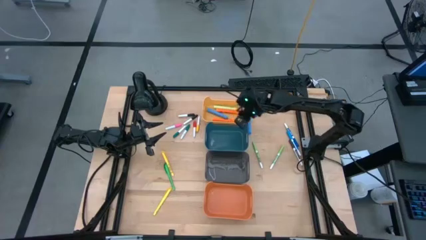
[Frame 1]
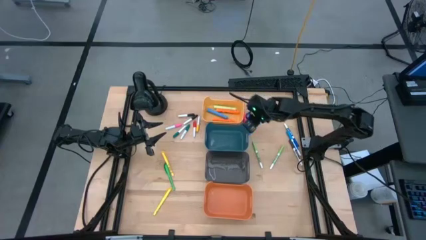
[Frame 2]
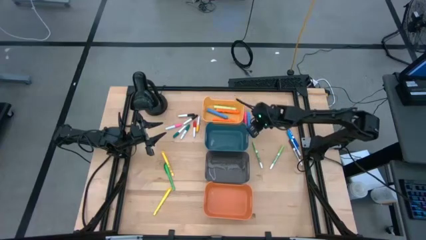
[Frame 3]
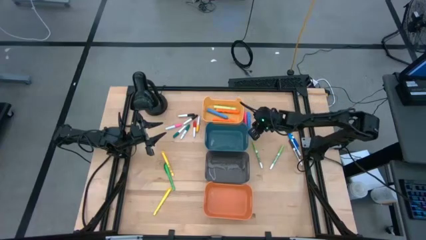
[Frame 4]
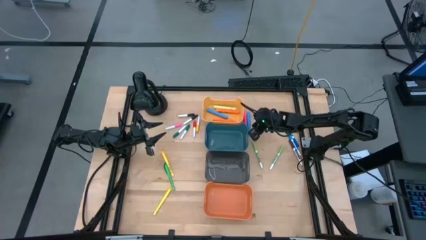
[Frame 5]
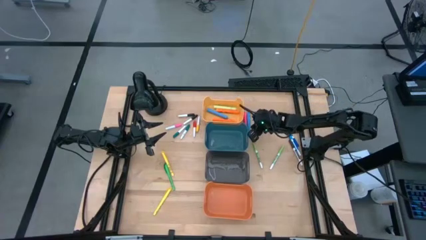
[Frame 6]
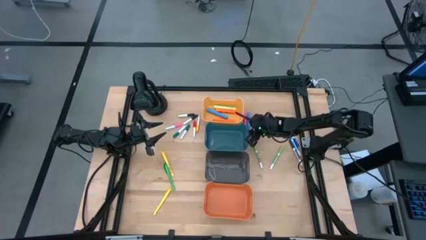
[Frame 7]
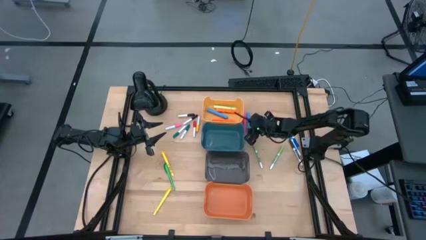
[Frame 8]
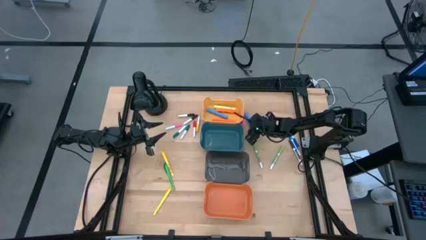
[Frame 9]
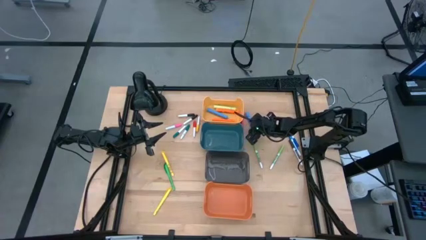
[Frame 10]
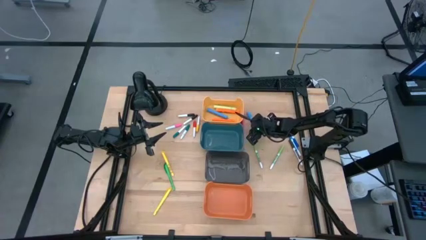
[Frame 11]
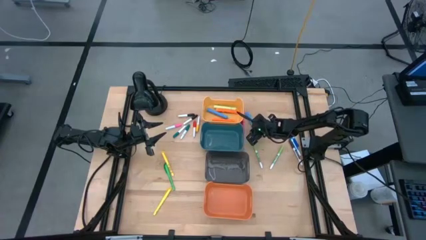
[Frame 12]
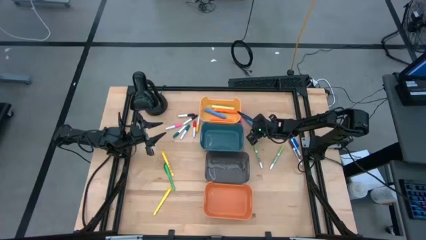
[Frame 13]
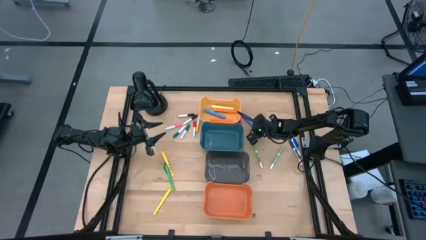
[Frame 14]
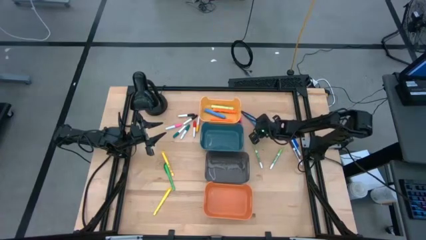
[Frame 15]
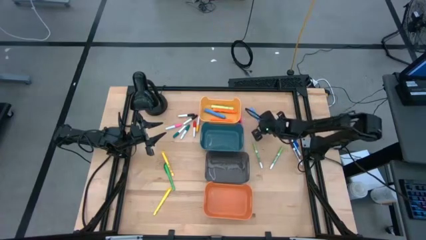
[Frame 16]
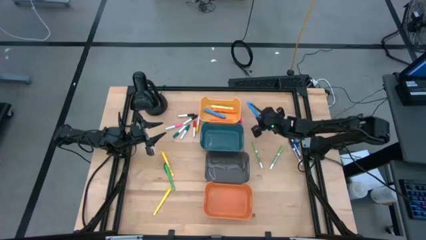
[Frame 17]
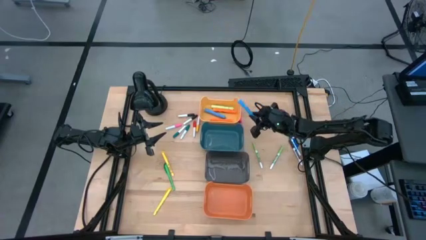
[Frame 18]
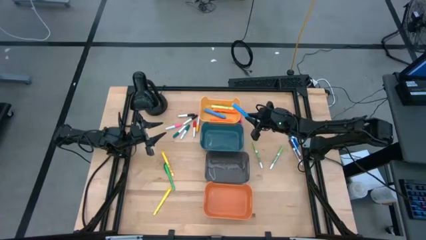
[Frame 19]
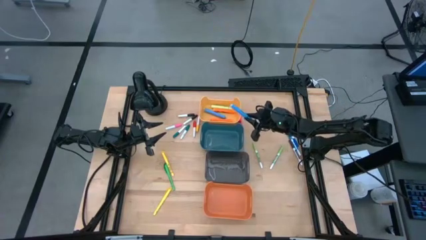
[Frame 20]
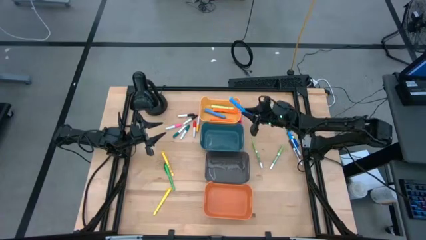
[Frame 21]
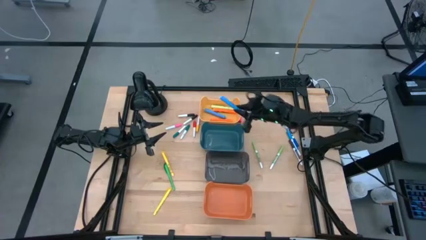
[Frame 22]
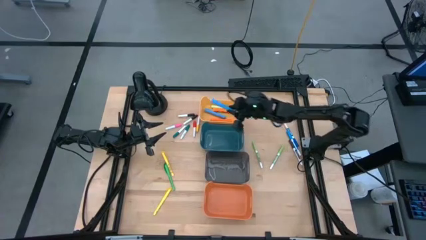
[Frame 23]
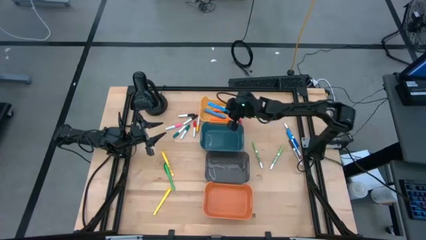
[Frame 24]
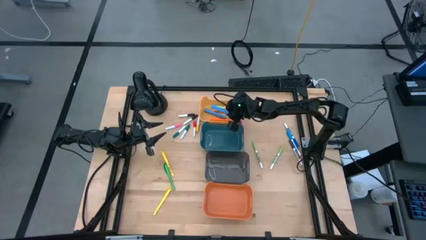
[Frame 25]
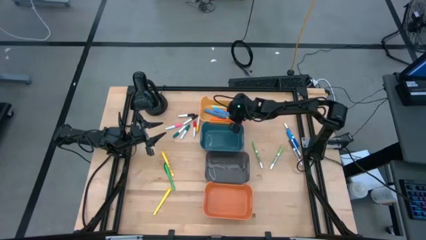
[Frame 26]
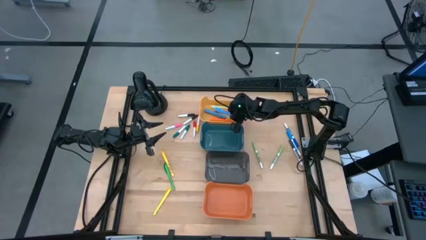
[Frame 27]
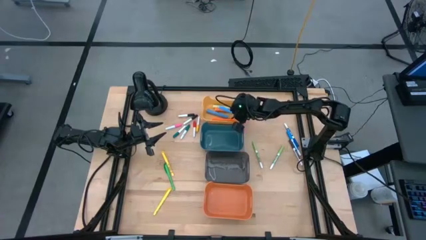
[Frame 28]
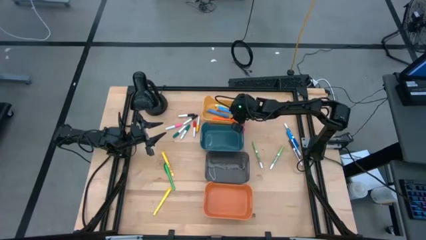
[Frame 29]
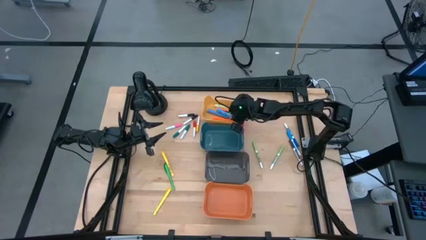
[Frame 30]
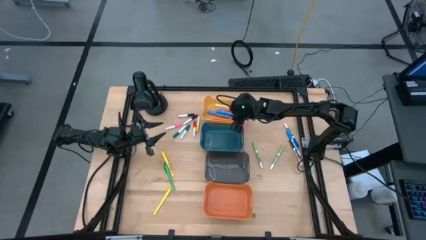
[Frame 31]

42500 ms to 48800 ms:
Task: Pick & Place Markers
Put the blue highlighter into the yellow bin

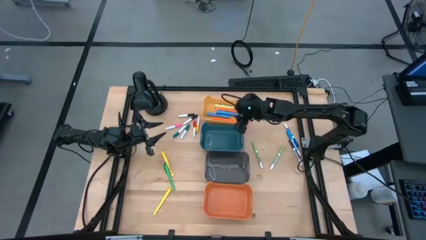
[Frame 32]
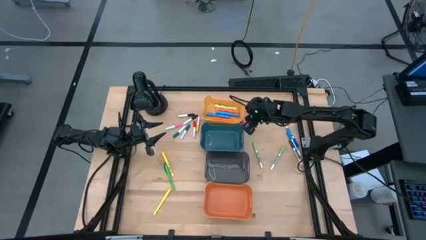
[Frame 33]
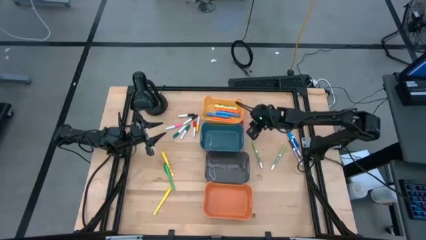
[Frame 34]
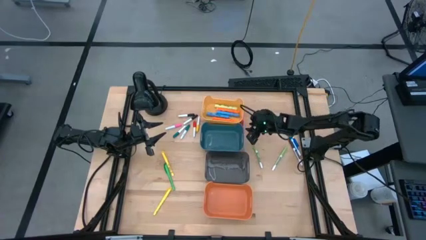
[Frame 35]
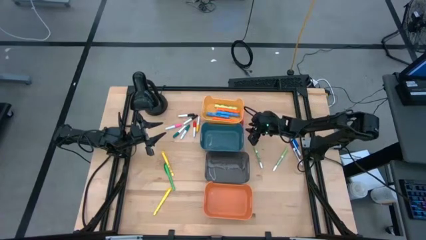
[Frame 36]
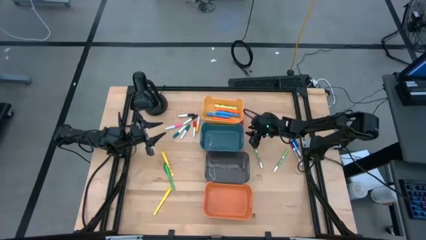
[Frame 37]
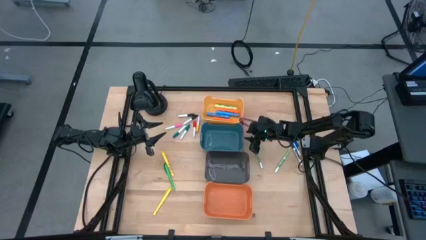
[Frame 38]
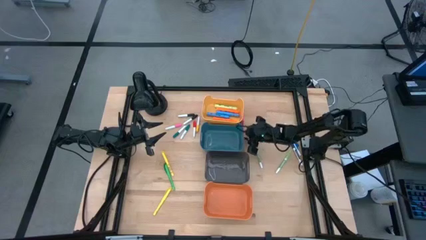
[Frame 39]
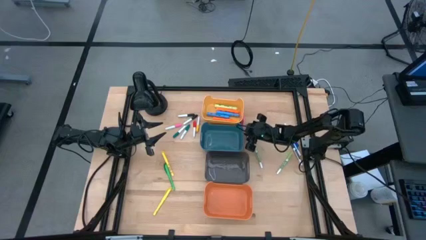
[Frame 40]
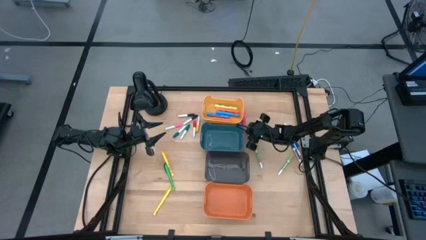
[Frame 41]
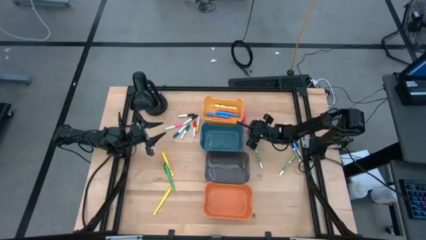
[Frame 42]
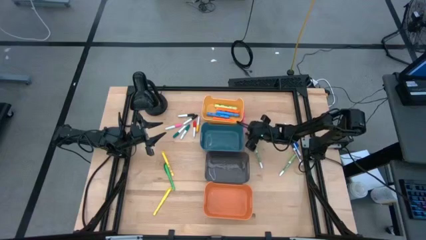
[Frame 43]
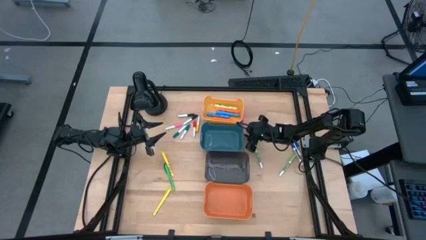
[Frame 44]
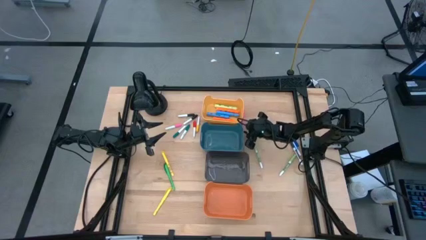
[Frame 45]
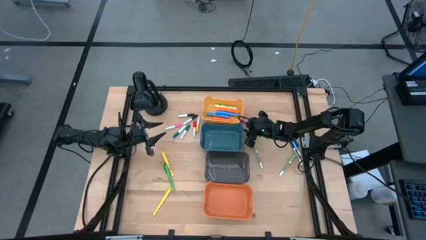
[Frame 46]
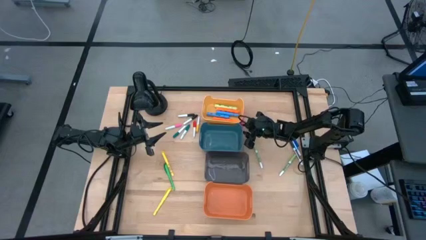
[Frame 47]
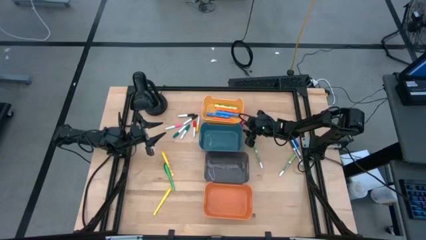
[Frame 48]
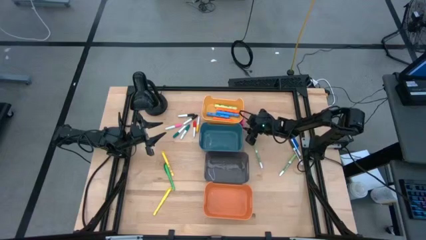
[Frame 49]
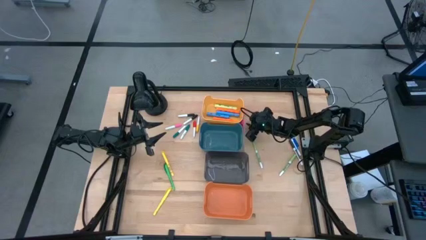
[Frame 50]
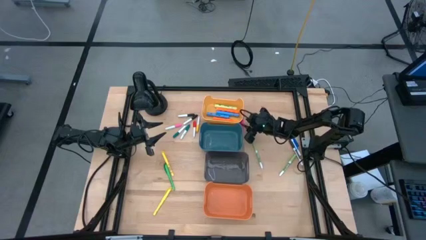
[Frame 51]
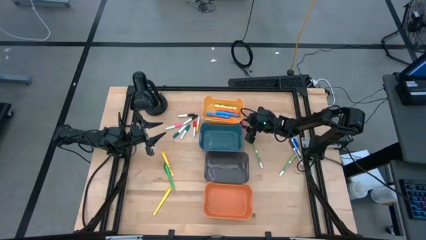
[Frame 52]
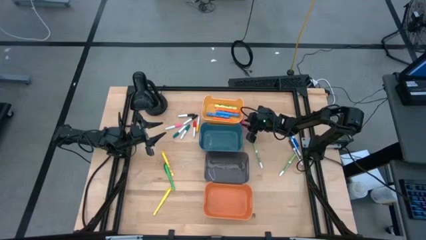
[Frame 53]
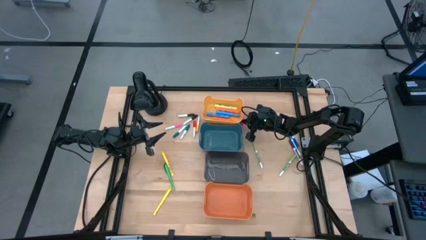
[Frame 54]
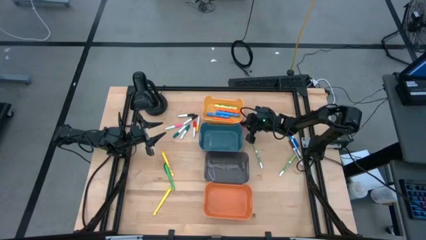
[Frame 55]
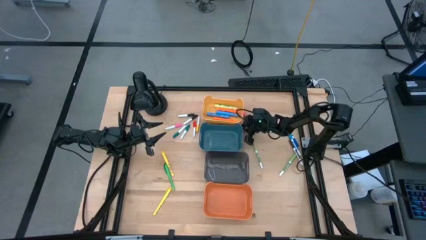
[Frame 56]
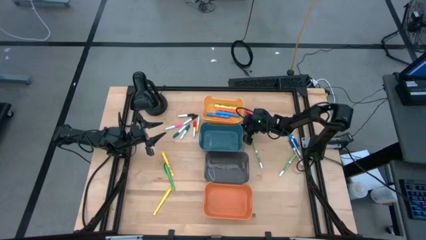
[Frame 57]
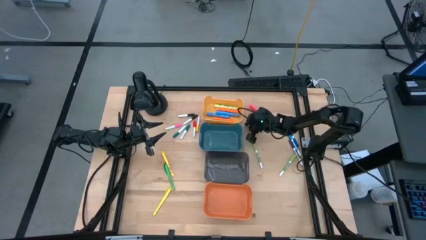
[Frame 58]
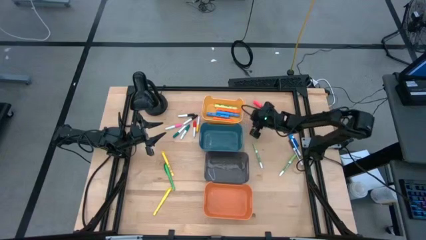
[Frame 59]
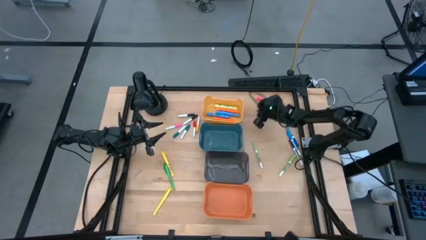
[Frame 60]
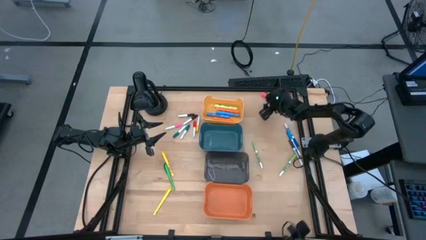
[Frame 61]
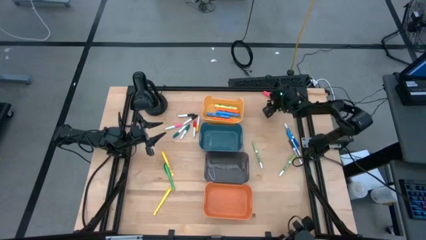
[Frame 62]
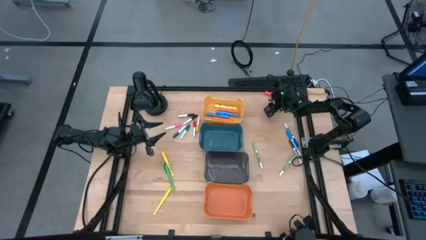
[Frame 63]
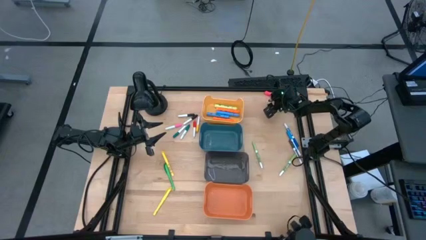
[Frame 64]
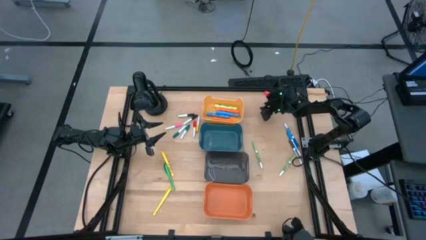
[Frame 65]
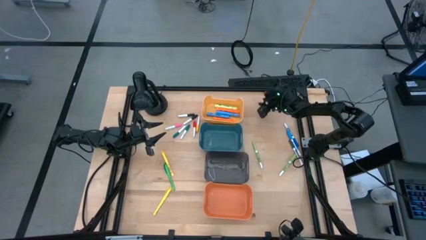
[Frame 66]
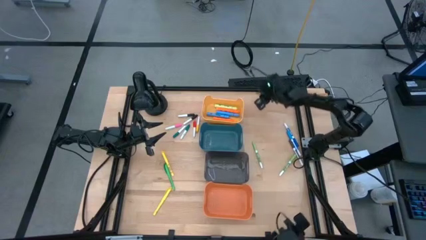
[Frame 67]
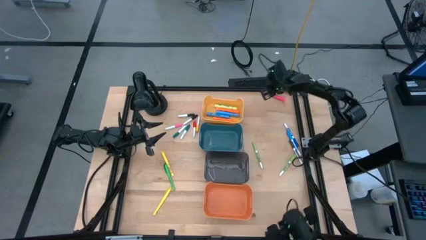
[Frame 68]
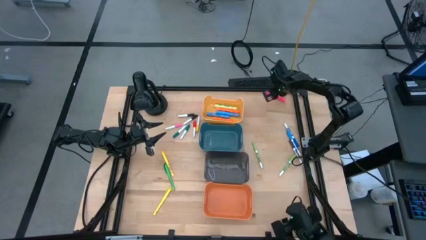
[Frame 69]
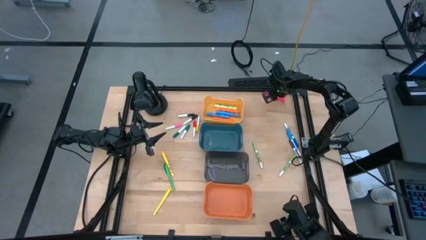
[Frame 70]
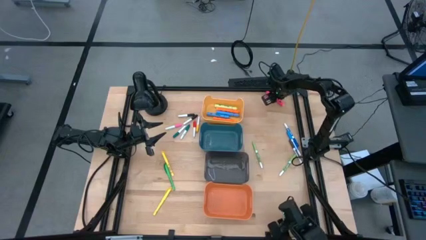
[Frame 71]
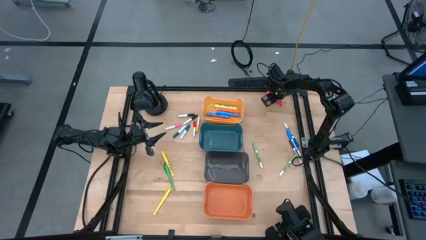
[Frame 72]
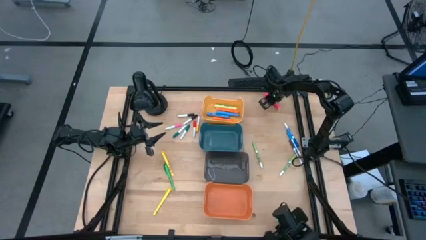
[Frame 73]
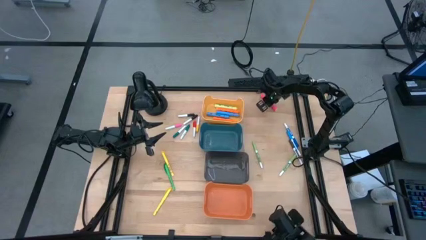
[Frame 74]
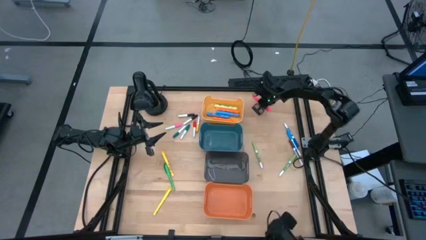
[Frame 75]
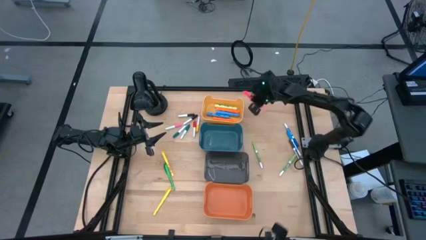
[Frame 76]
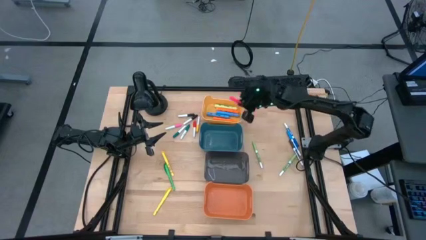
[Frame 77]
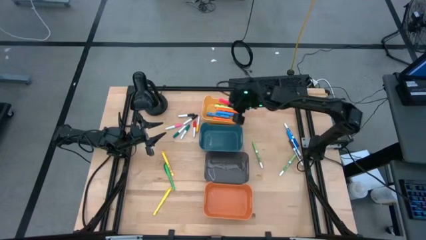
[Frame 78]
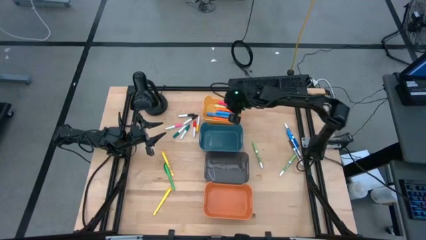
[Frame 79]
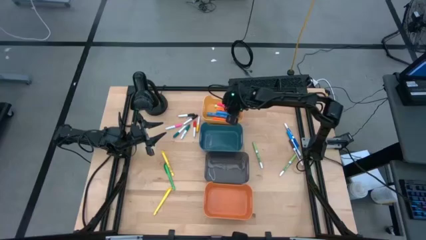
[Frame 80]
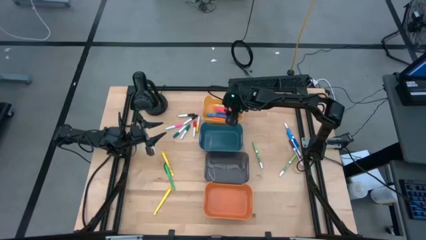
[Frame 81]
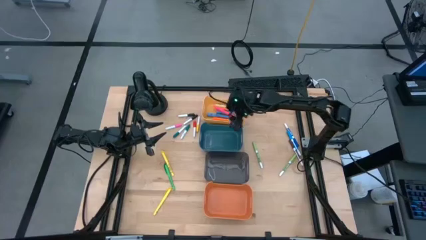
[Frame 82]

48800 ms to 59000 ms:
Put the pink highlighter into the yellow bin
